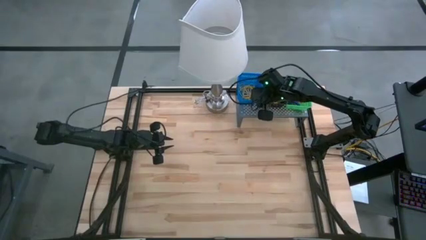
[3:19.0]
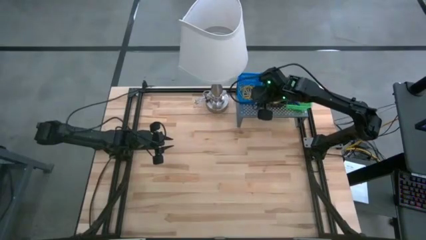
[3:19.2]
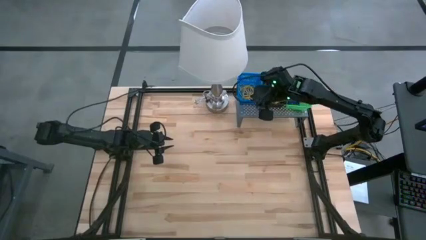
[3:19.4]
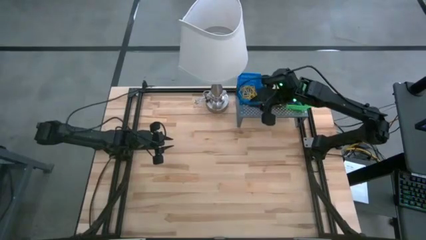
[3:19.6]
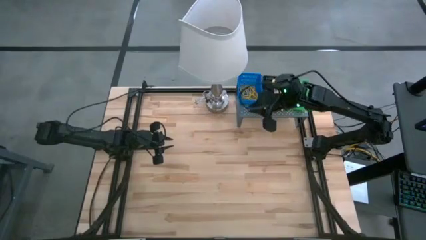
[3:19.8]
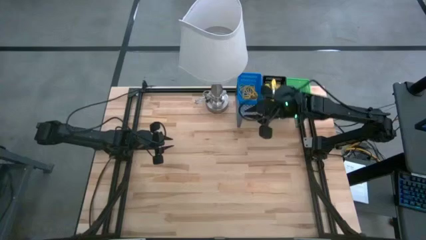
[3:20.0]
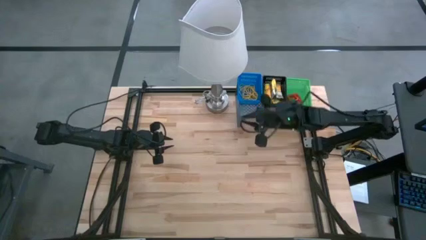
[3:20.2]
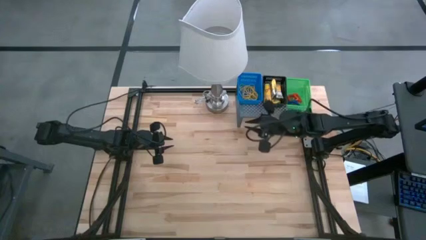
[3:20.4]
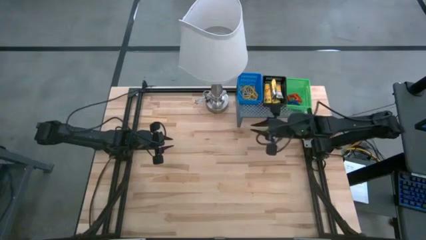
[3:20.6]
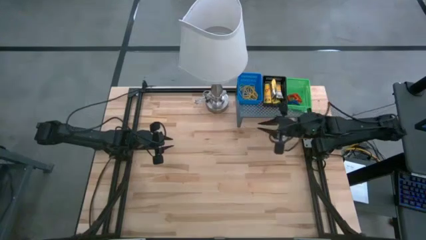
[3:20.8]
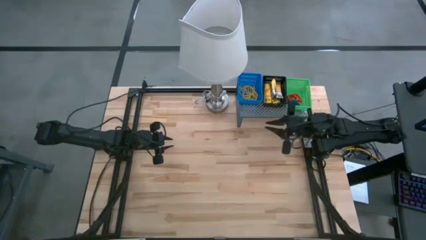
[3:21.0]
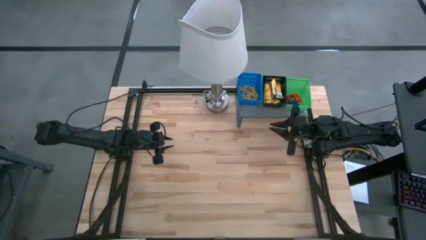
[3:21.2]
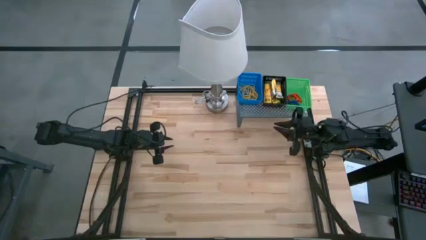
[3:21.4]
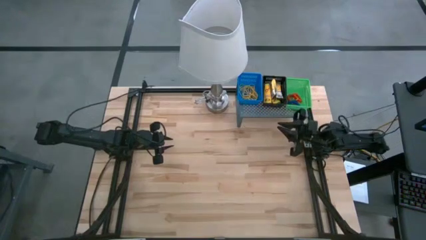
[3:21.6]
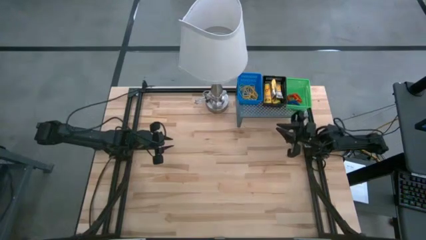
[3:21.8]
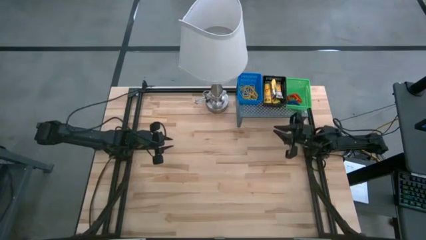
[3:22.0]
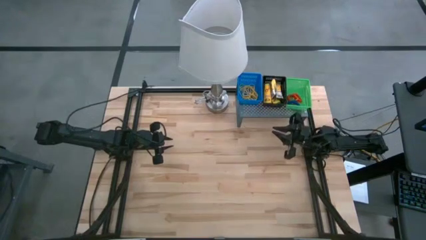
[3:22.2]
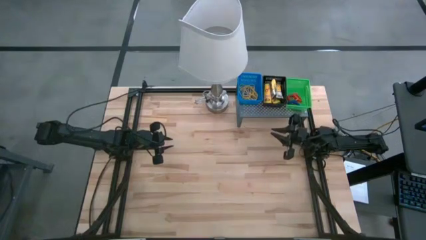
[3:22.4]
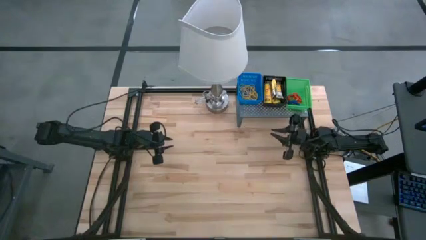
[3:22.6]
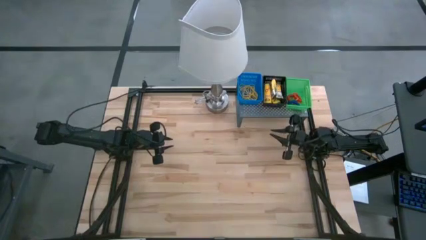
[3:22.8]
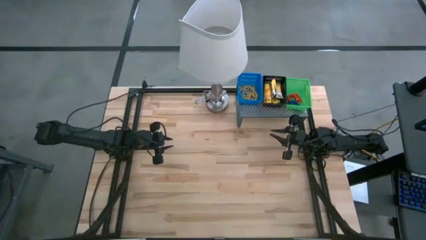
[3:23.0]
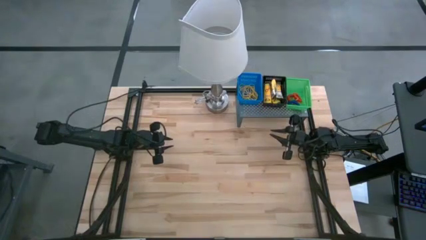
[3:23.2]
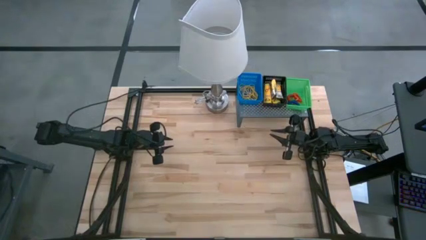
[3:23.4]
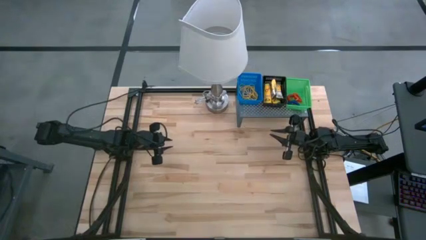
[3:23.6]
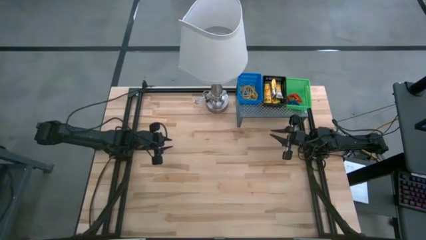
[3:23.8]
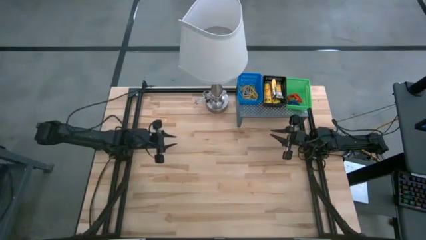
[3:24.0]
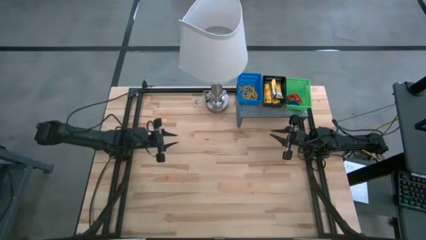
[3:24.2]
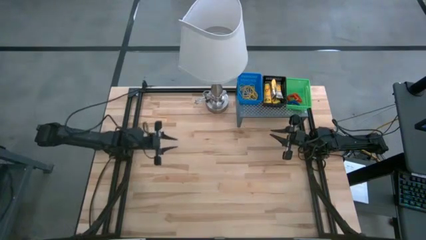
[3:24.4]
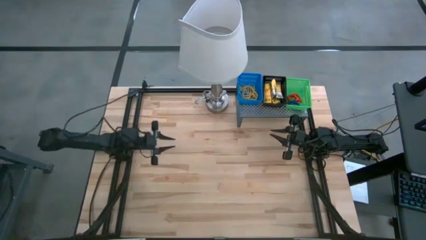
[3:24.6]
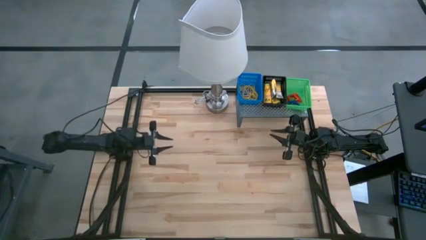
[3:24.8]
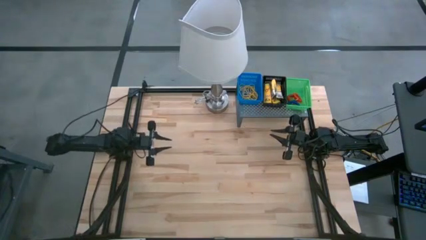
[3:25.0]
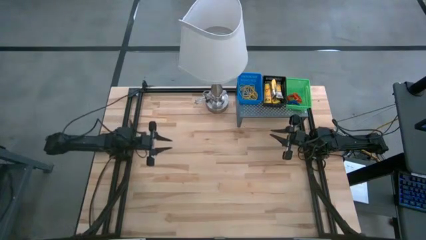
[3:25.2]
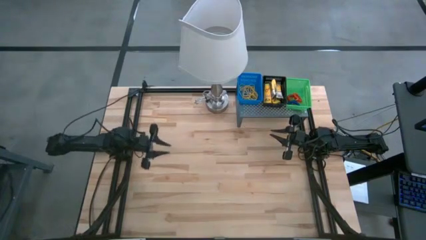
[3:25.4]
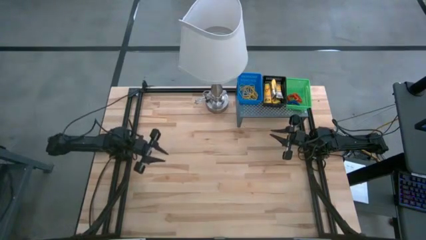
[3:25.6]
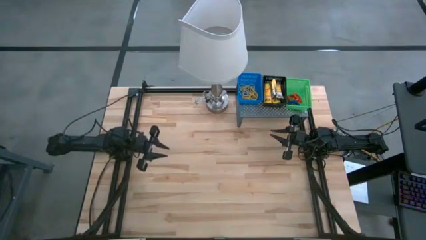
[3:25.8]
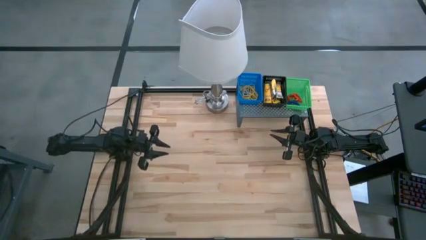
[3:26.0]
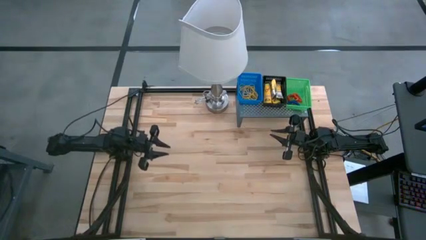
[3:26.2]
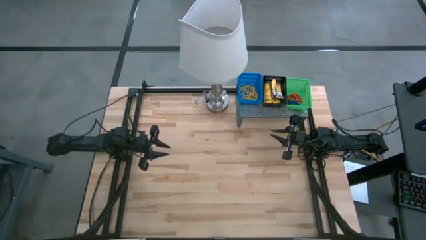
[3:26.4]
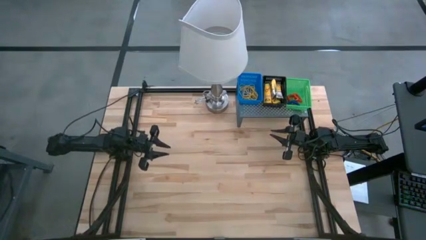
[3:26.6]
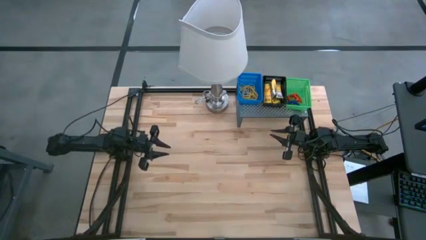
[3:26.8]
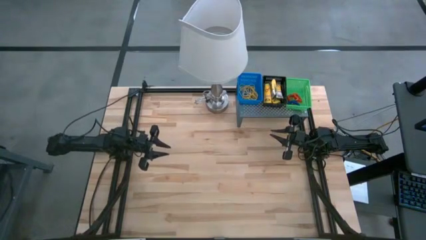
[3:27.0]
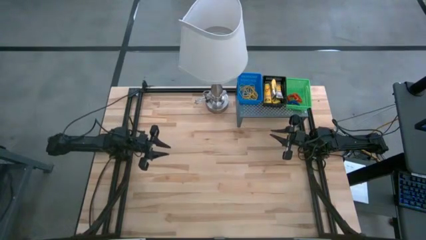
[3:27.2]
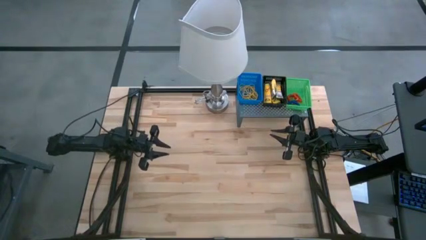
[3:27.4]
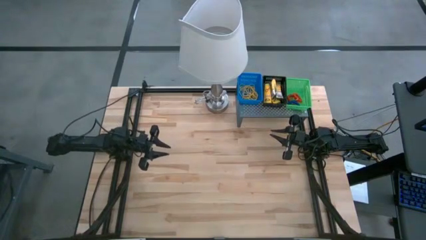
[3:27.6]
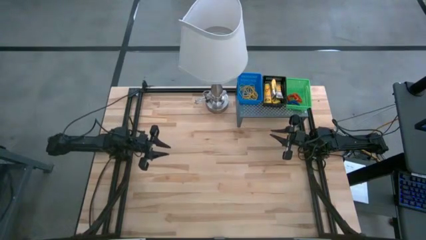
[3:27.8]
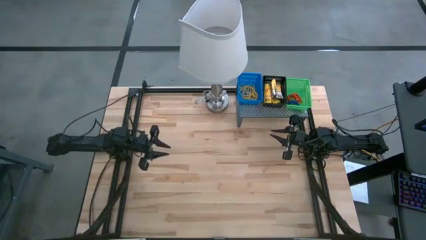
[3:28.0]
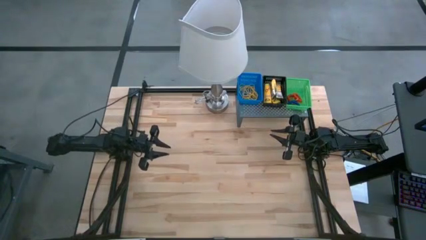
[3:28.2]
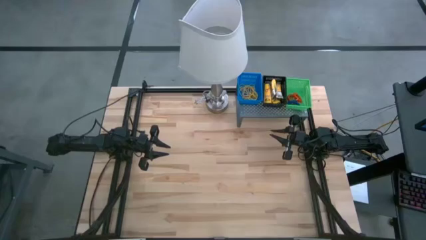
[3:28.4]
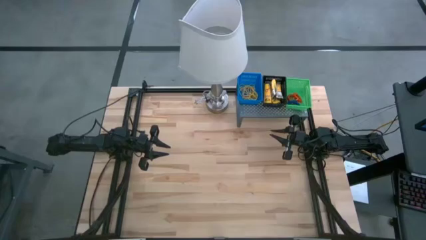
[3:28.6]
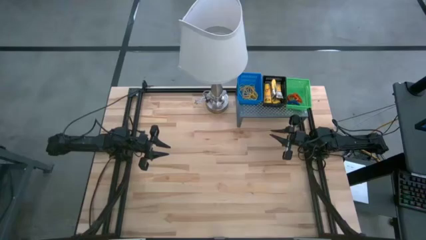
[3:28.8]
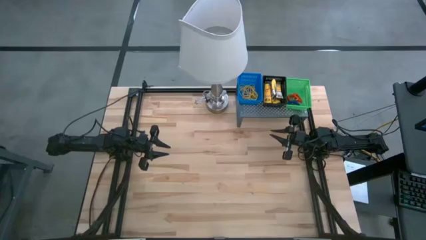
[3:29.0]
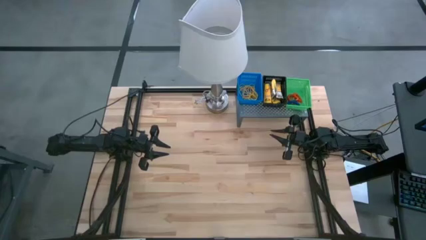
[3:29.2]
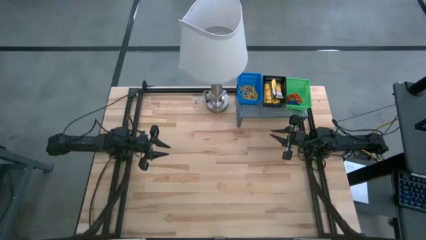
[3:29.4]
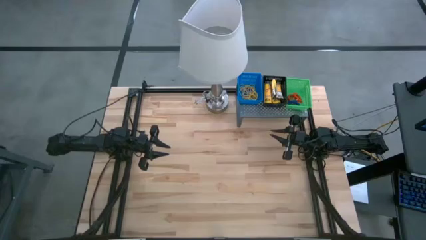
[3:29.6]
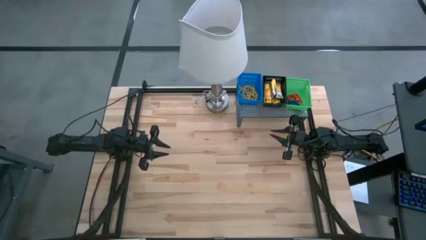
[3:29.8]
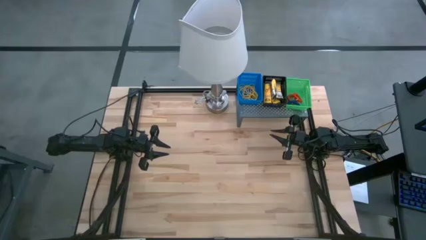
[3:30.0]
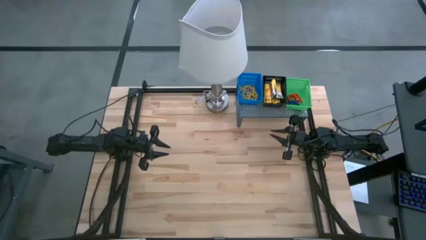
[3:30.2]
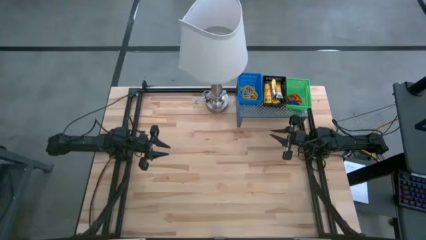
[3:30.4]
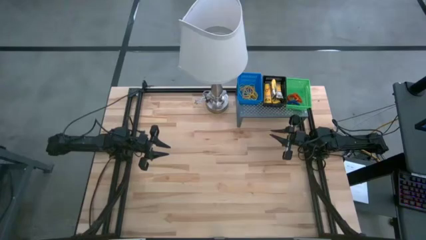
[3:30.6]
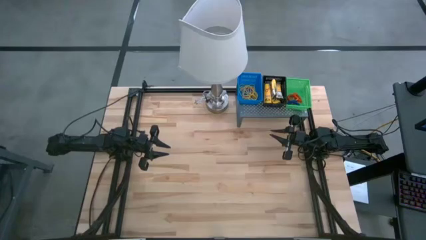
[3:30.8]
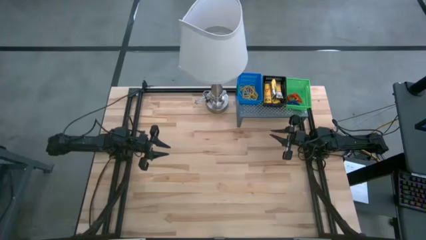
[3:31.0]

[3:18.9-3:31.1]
Task: Pick & Place Office Desk Supplies
Return to Home Position

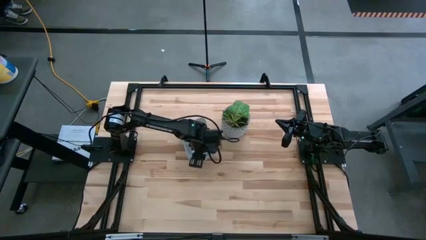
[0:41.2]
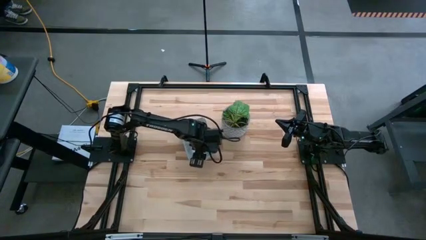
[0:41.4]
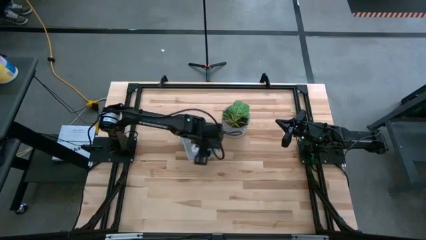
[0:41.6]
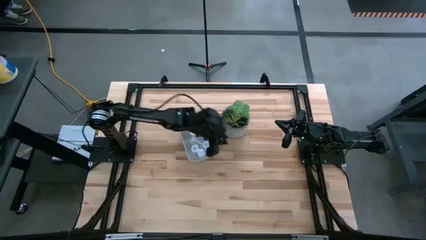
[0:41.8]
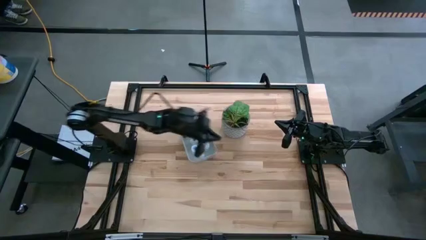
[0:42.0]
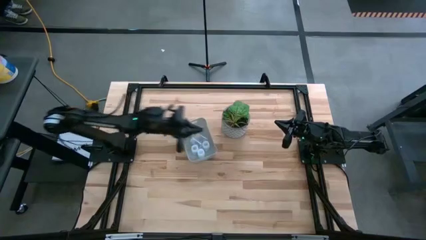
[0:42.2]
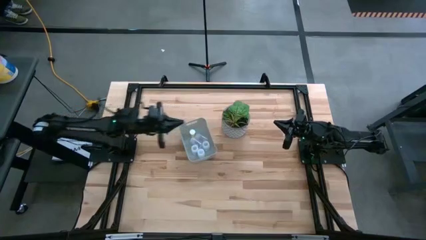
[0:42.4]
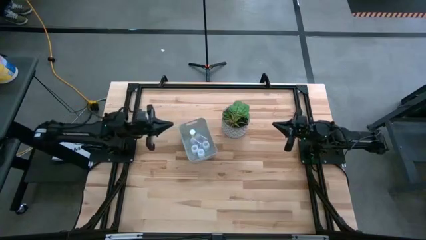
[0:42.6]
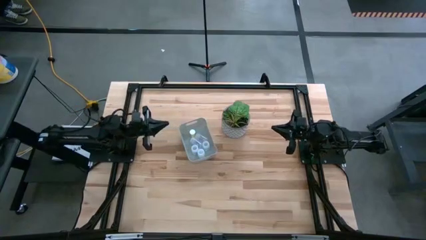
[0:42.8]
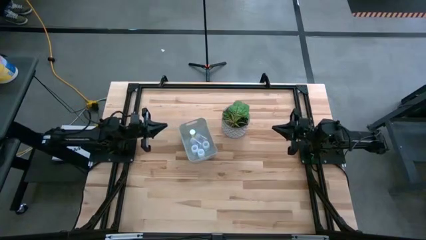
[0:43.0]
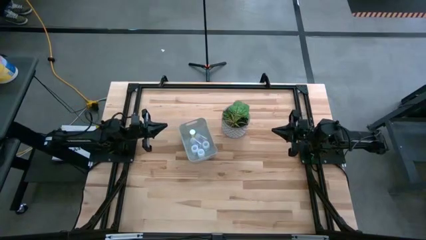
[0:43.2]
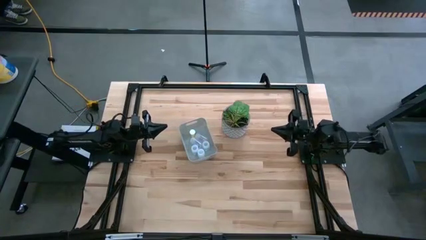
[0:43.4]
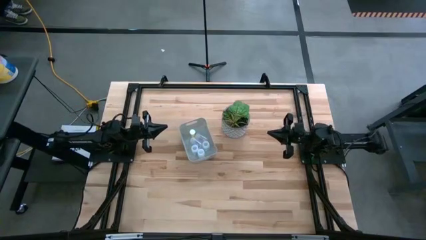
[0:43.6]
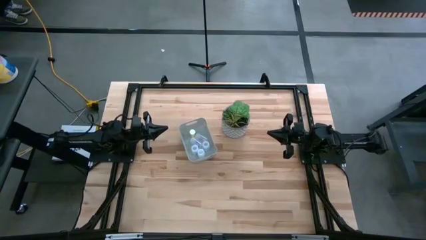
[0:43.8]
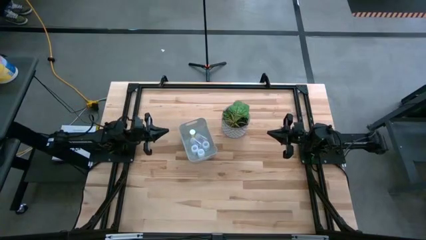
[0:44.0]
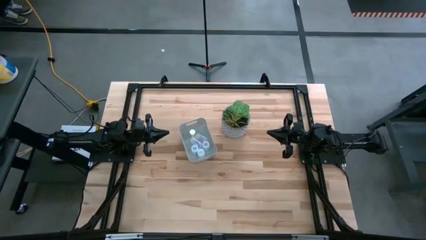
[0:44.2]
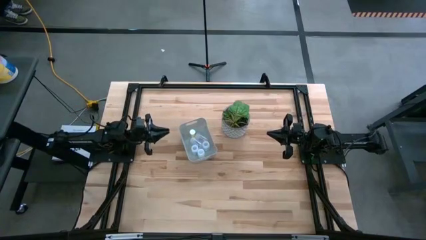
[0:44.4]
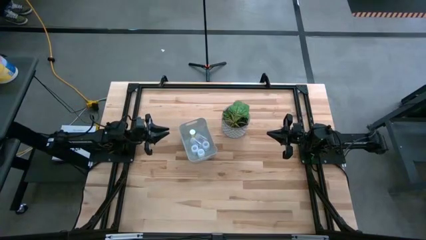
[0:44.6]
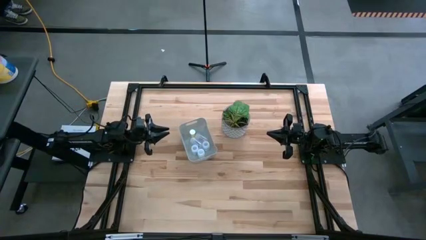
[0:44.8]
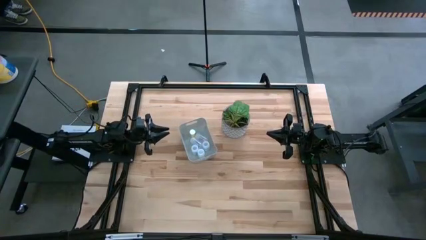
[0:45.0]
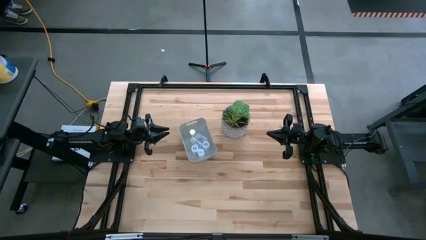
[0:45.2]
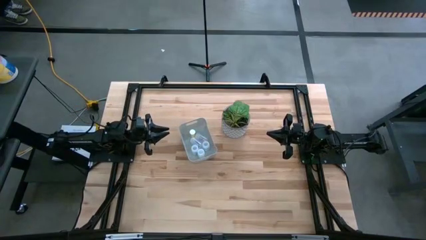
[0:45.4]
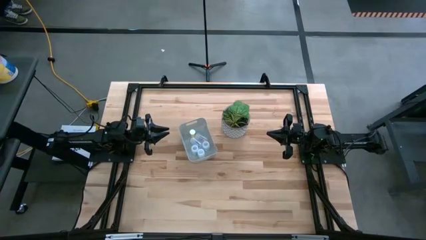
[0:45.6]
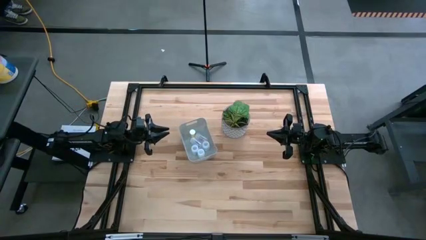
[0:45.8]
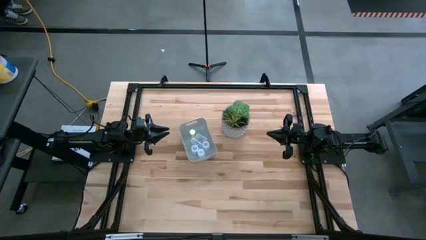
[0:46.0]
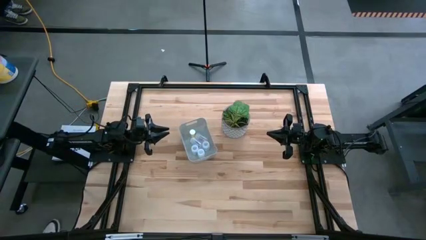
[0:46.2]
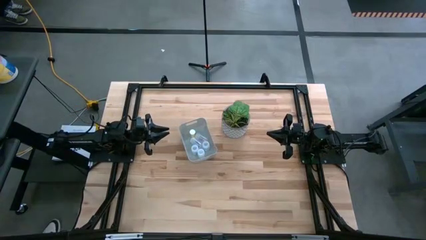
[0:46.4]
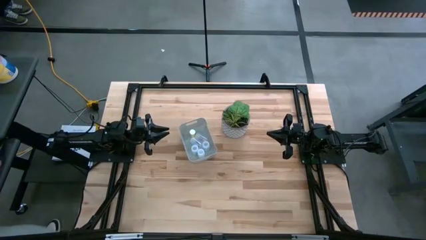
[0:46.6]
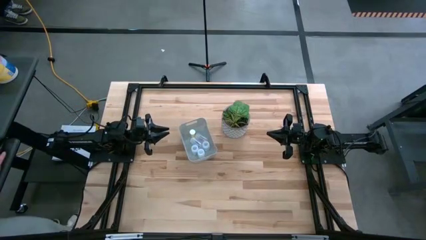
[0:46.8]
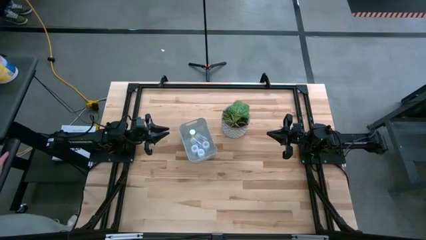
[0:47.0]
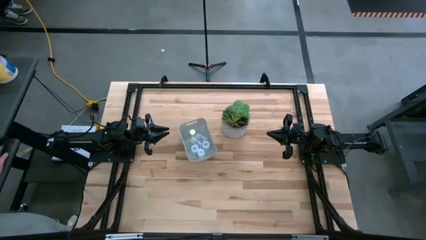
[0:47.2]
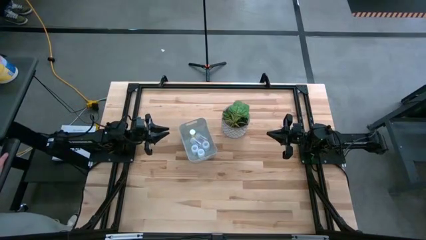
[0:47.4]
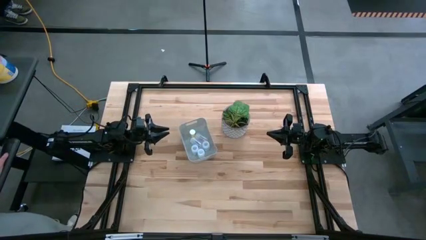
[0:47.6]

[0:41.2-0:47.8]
Task: Pick and place pill bottles into a basket
Return to Home Position
